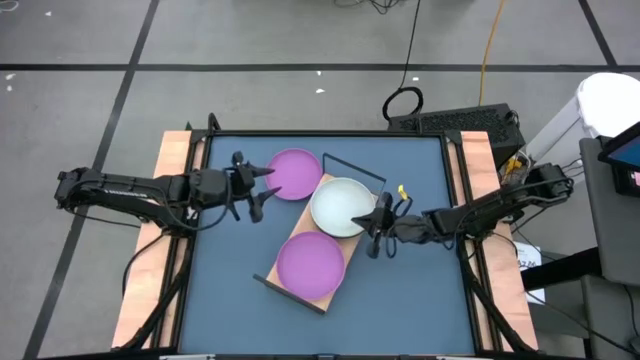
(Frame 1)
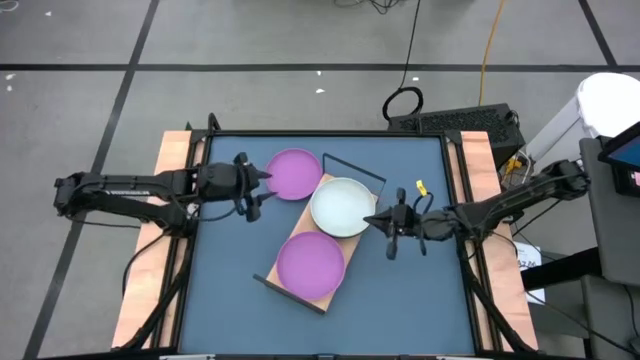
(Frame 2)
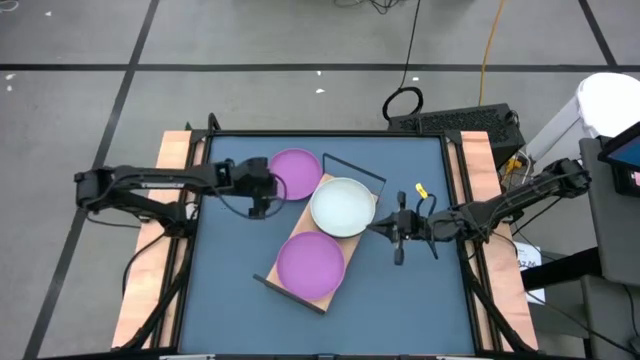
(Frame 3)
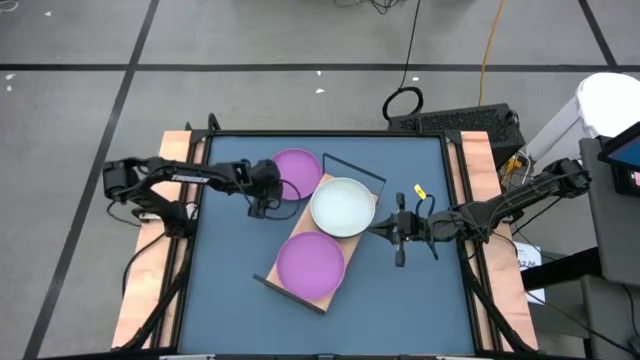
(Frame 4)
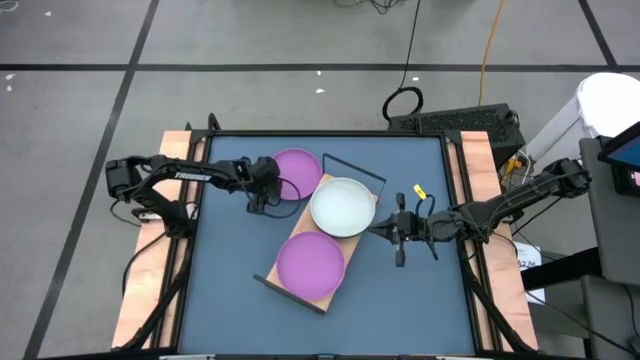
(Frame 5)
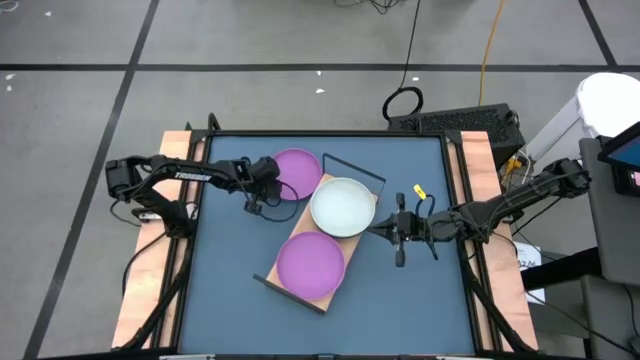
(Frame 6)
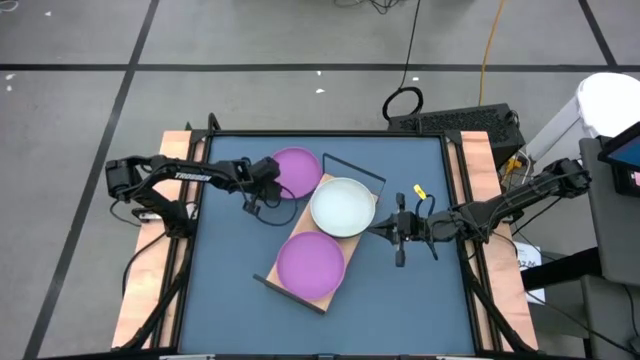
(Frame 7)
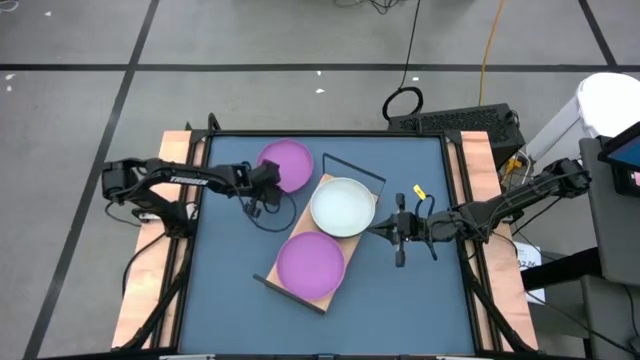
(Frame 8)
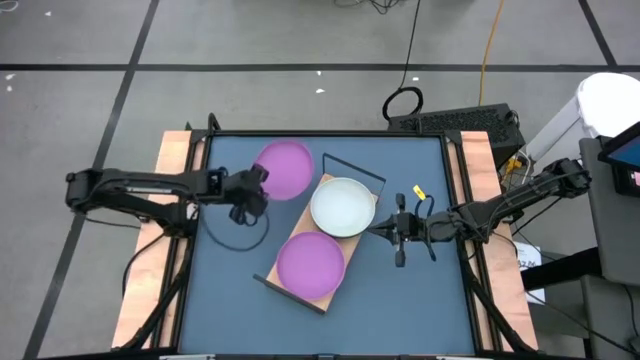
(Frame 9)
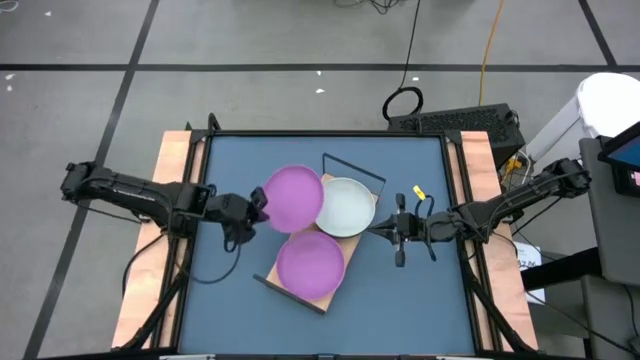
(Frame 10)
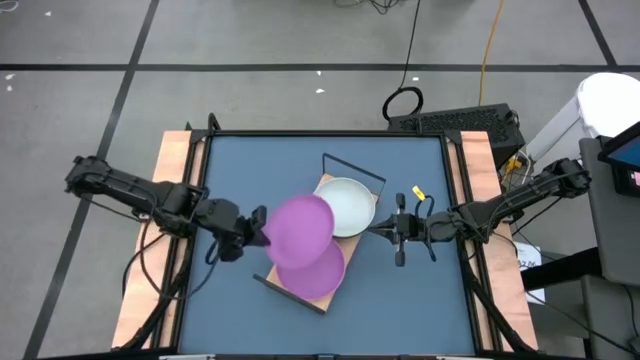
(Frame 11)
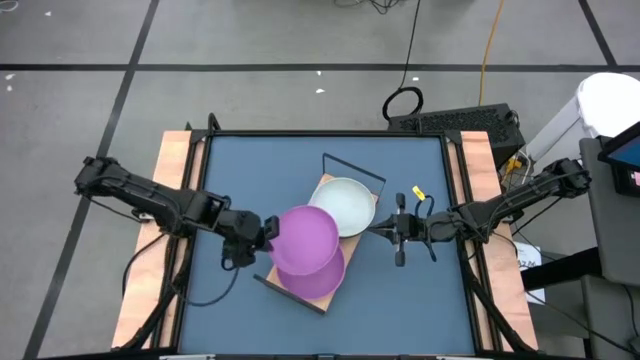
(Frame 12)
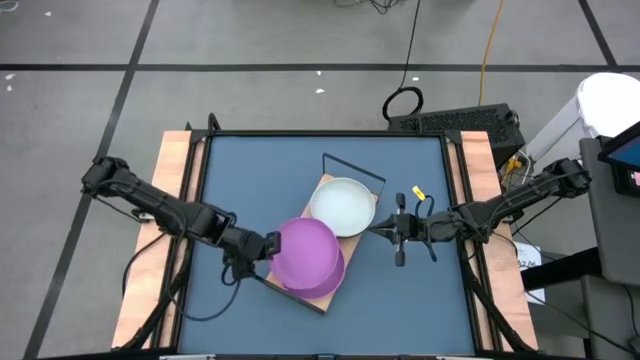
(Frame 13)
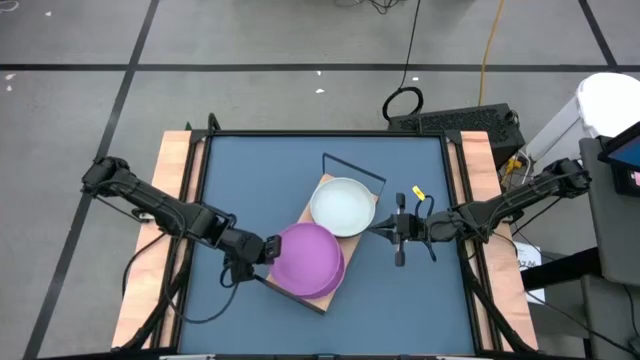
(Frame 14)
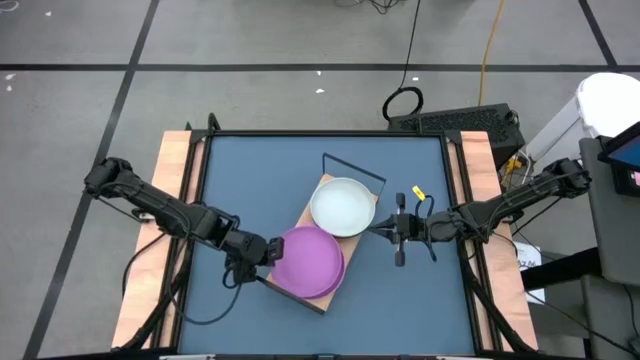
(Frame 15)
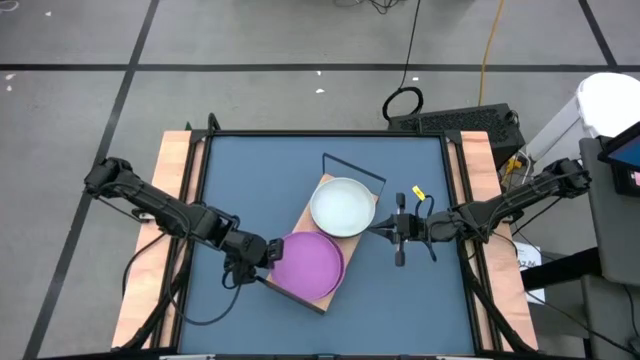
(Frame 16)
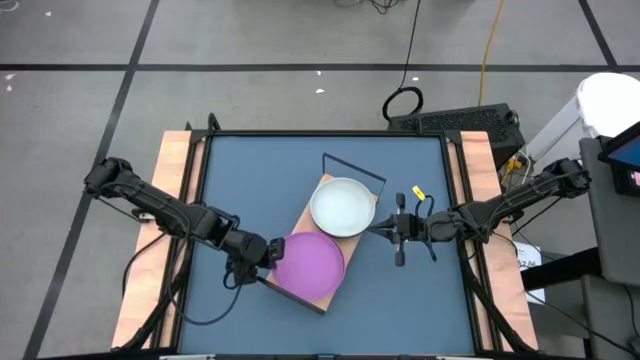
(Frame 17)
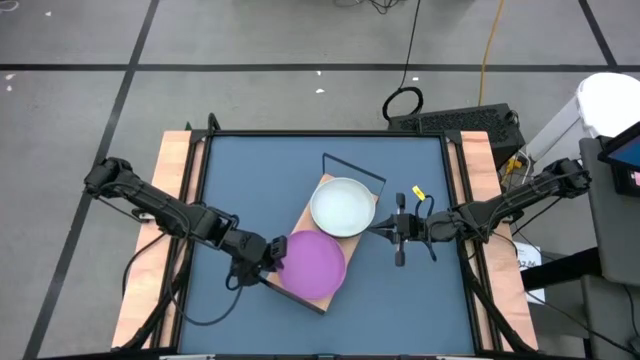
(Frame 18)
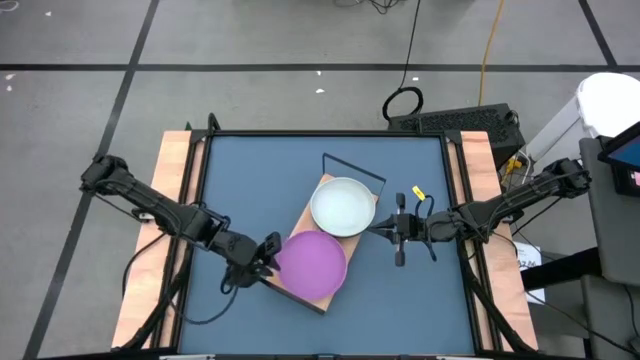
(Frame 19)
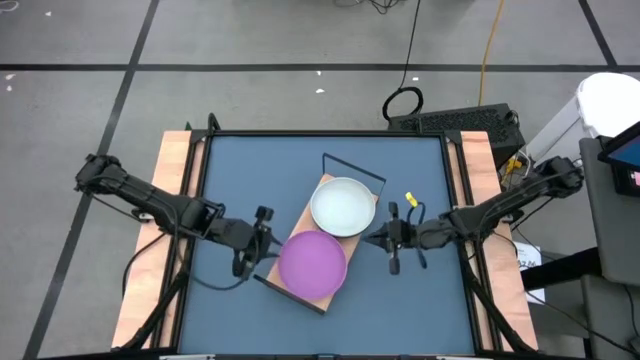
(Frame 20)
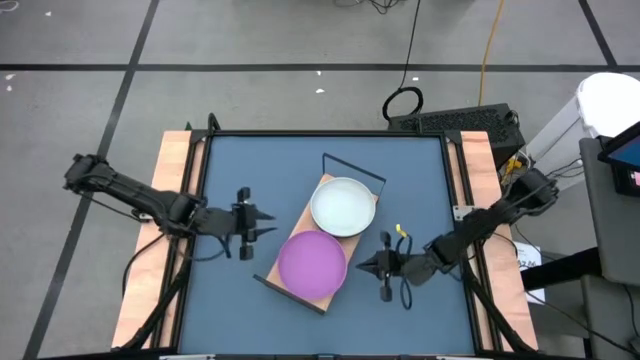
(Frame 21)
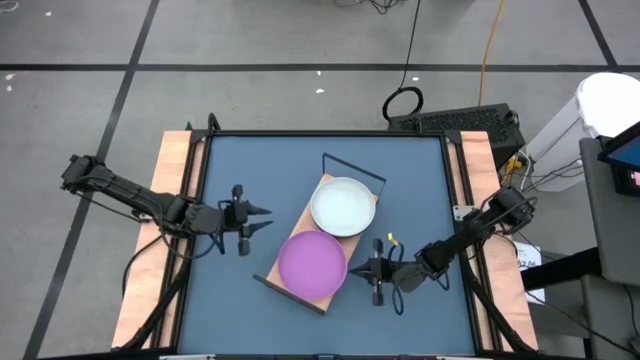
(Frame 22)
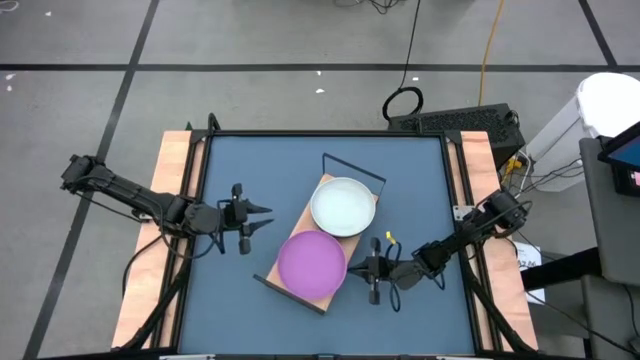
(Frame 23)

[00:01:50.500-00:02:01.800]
Task: Place and stack plates onto a shelf
Stack the purple plate on top of the purple plate on the shelf

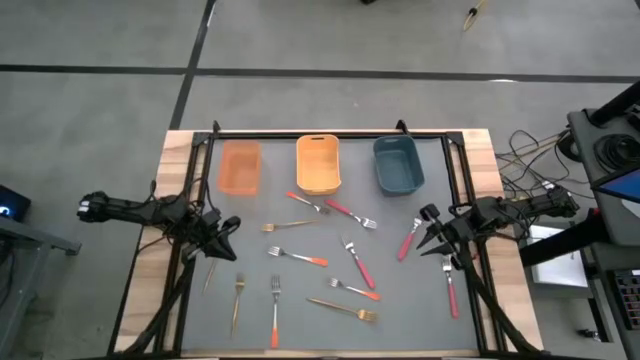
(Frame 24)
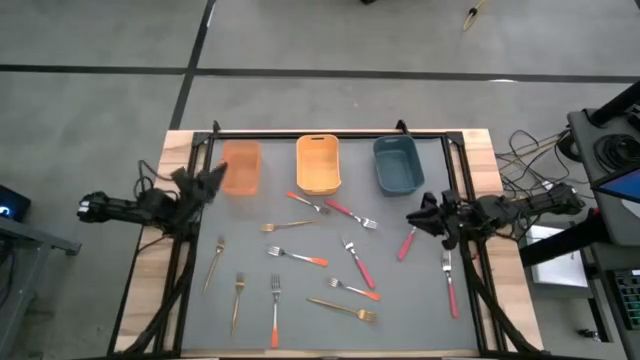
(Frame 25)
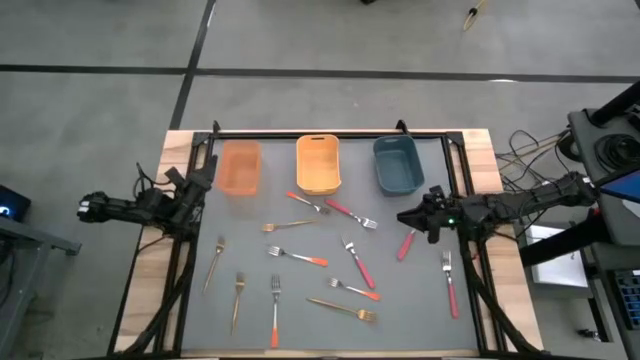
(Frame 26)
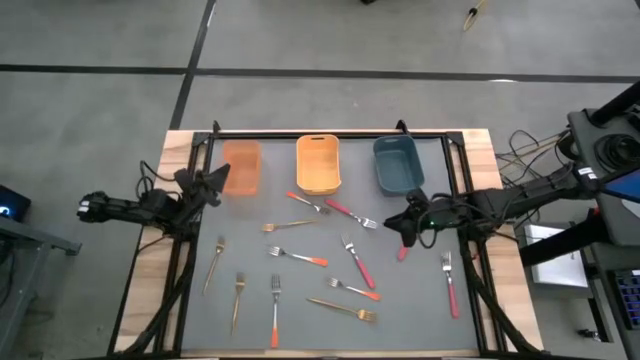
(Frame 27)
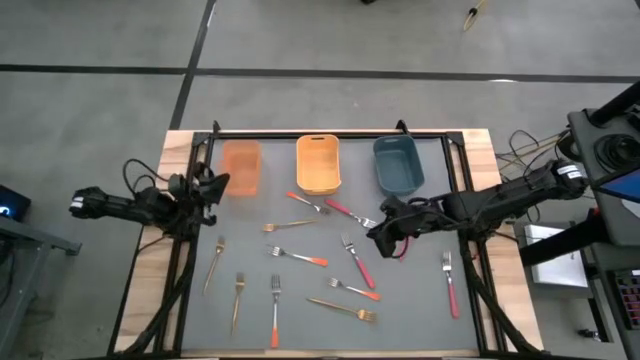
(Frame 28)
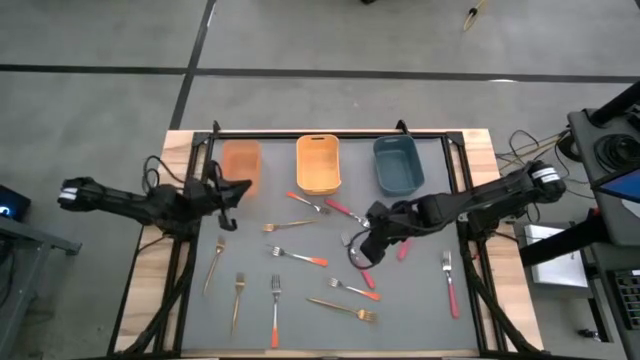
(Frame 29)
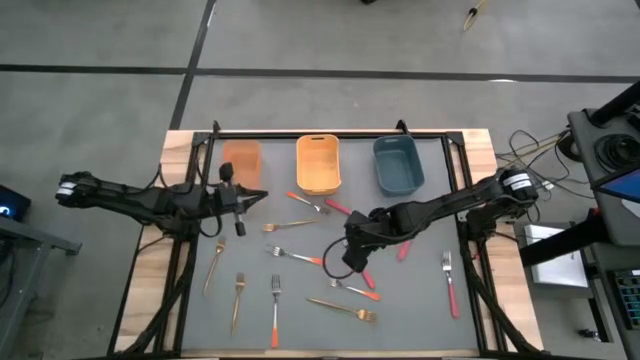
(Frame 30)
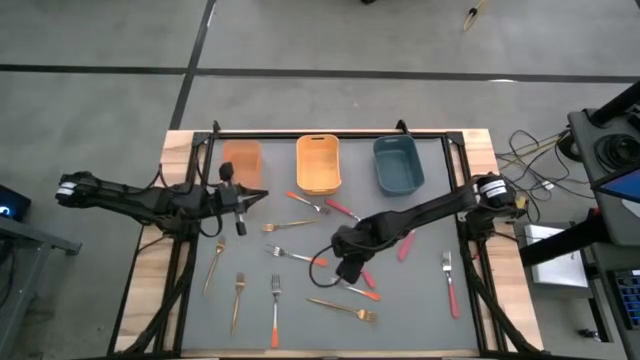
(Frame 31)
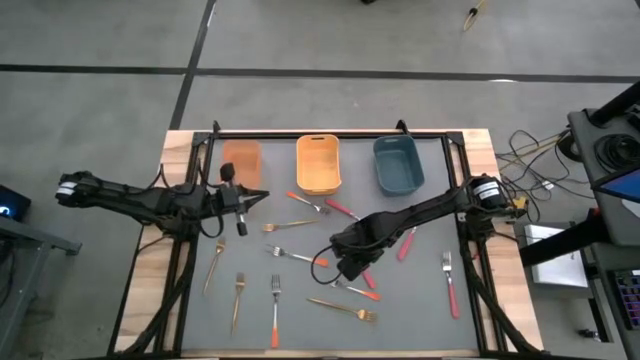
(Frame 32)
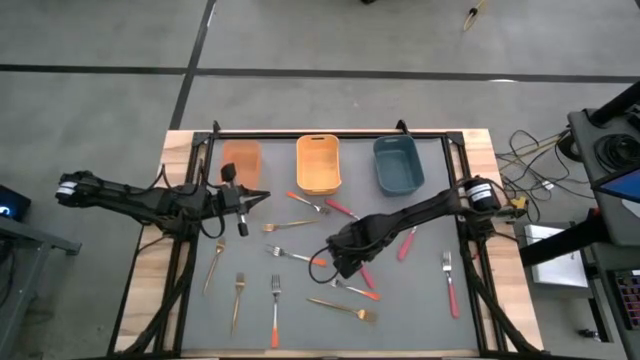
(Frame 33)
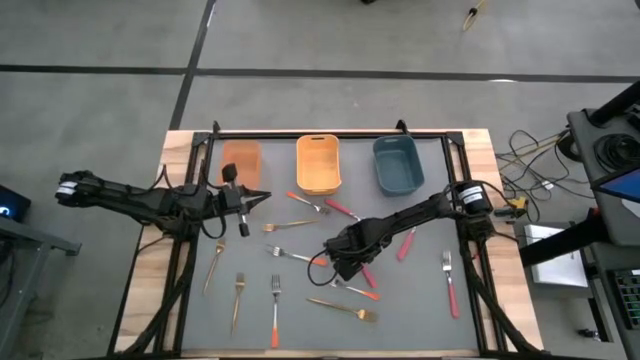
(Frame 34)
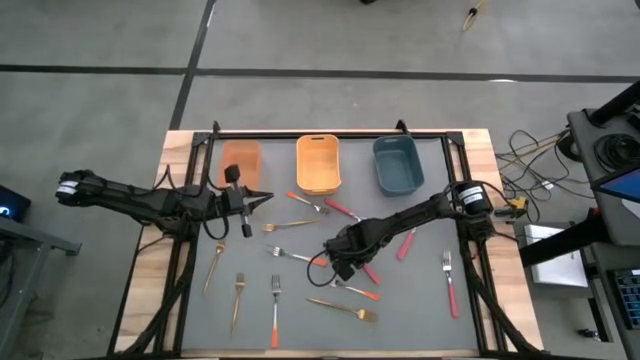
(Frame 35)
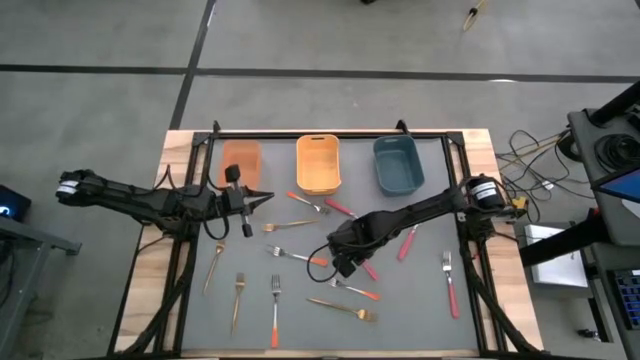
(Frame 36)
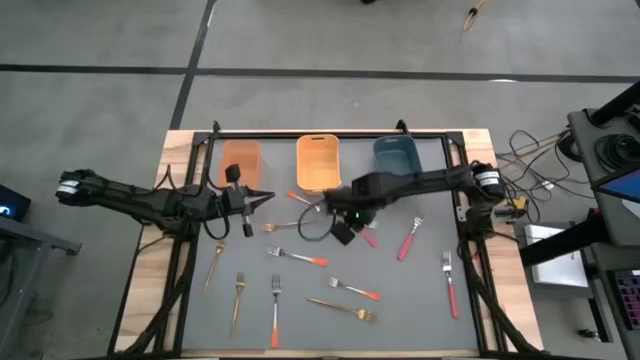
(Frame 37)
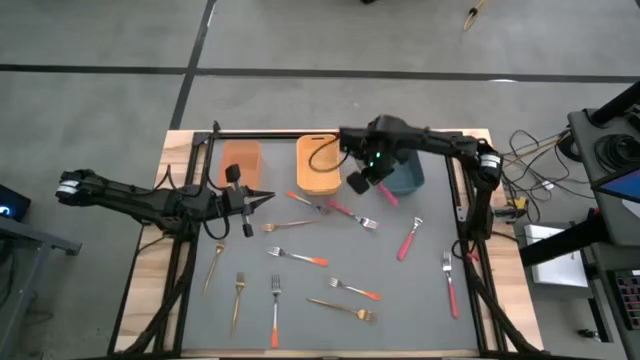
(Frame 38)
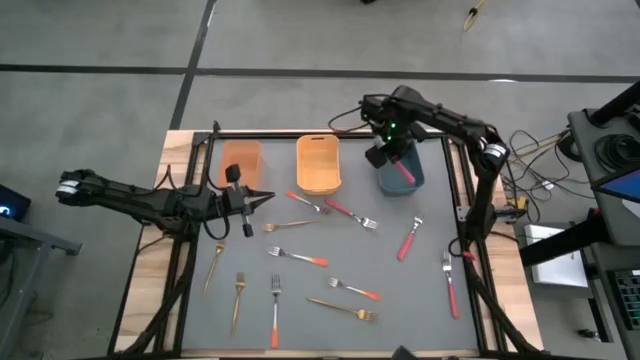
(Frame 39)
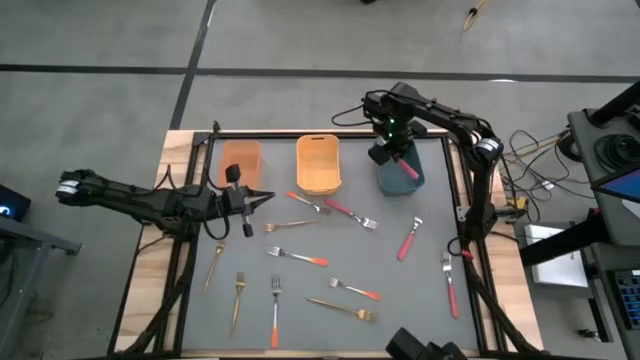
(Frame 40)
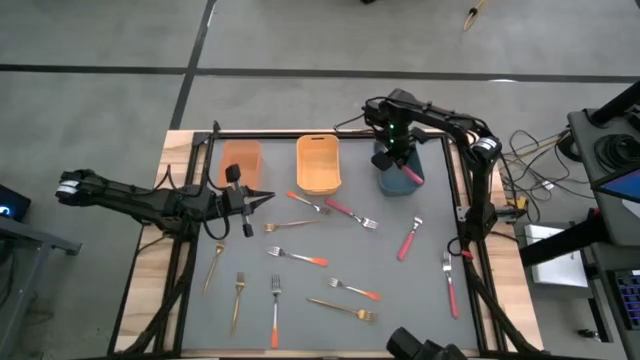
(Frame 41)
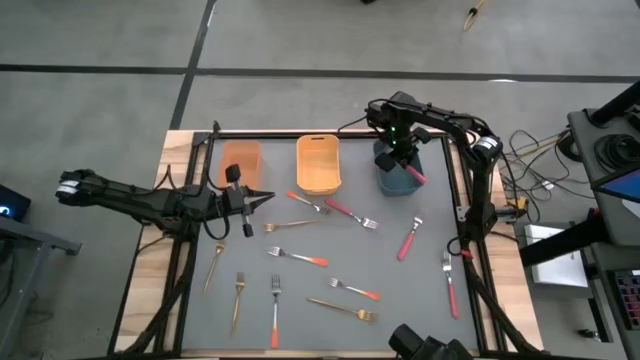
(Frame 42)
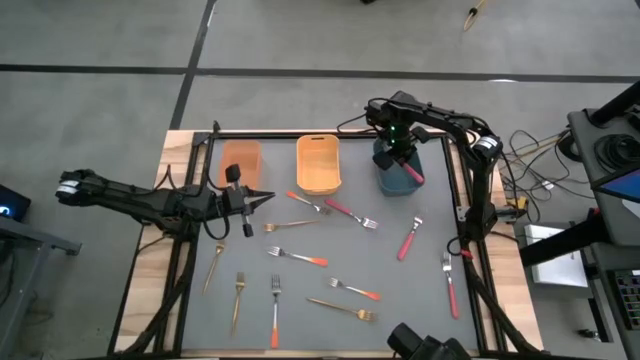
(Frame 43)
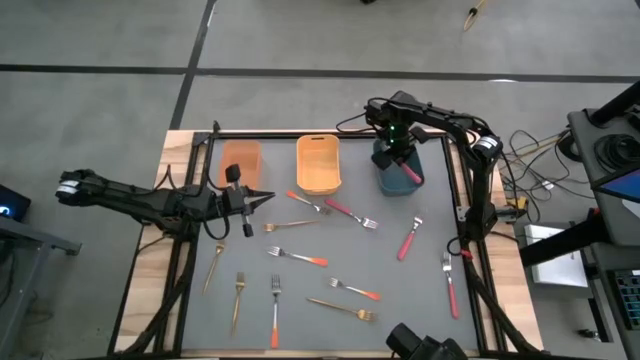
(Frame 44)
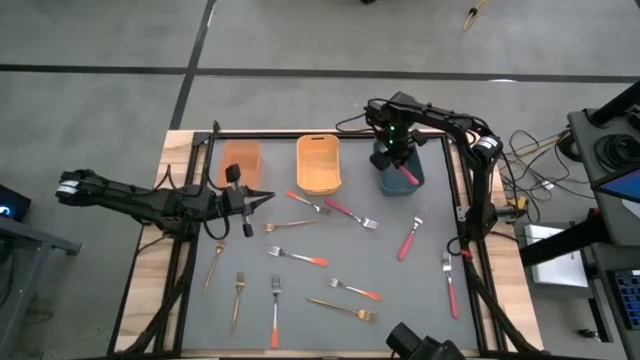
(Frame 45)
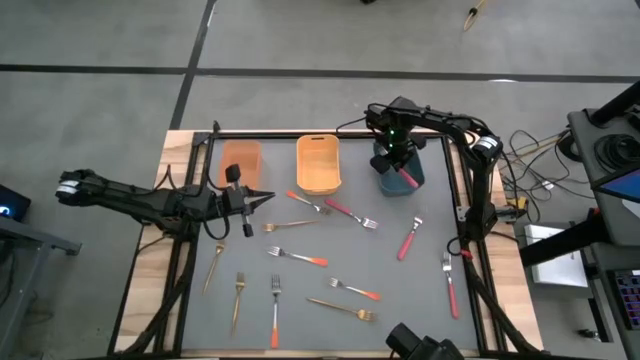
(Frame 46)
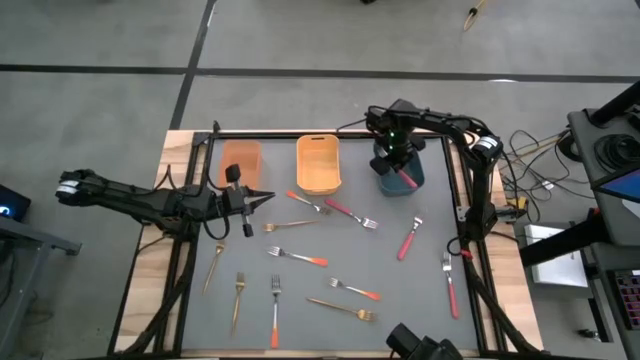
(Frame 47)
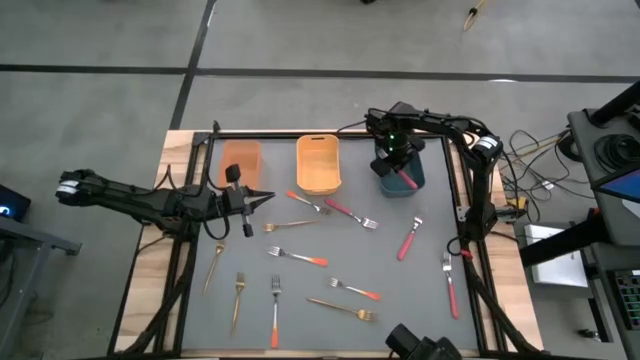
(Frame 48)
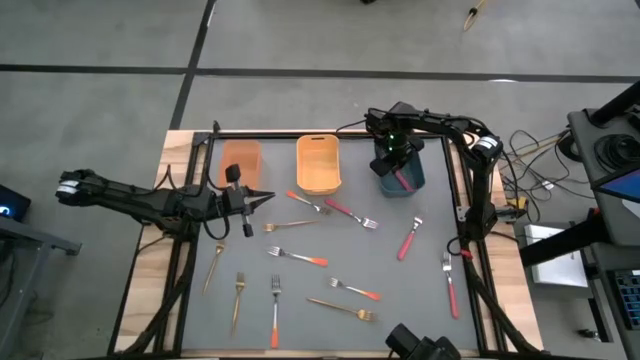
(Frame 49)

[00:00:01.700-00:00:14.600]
Task: Sort silverware by color (type)
Put the red fork into the blue bin
